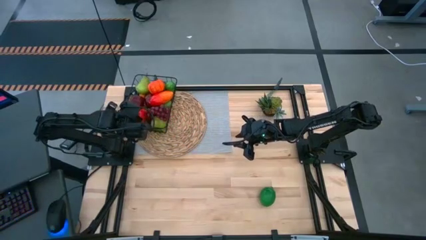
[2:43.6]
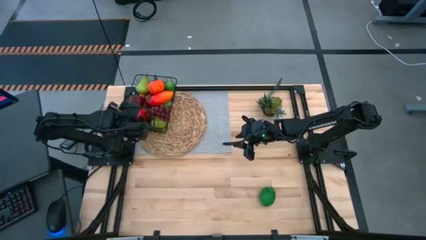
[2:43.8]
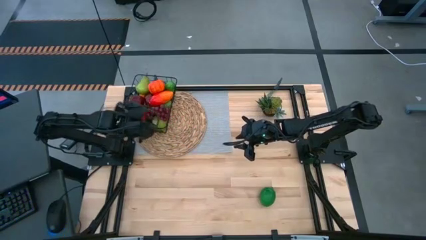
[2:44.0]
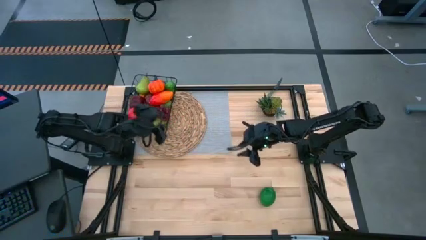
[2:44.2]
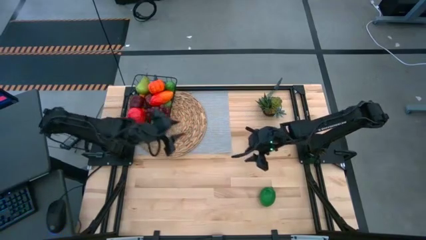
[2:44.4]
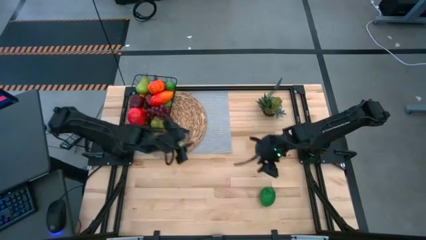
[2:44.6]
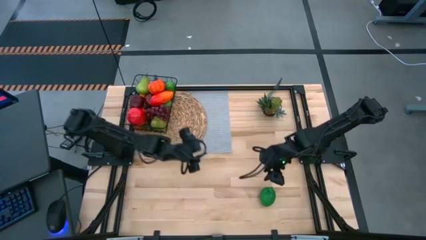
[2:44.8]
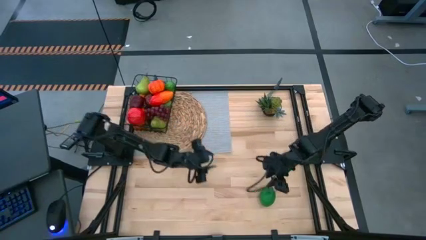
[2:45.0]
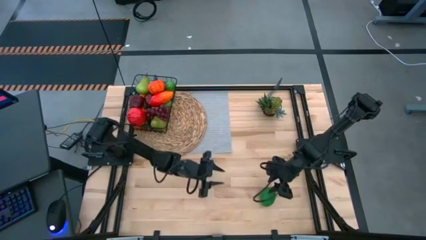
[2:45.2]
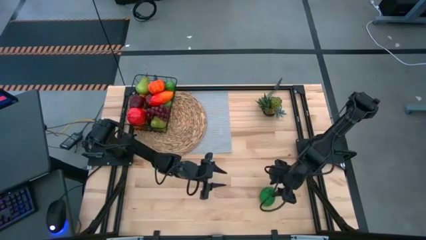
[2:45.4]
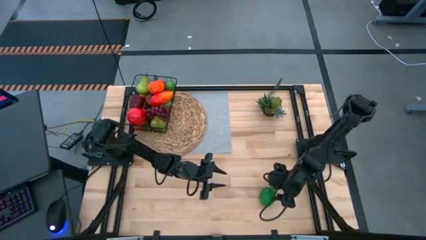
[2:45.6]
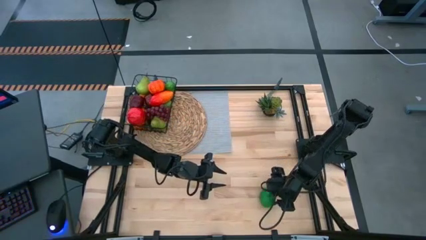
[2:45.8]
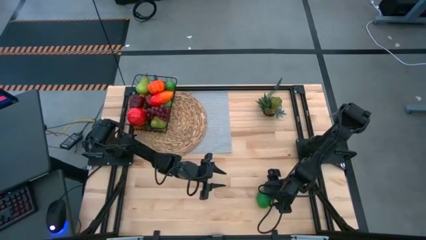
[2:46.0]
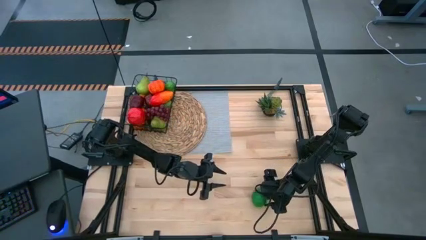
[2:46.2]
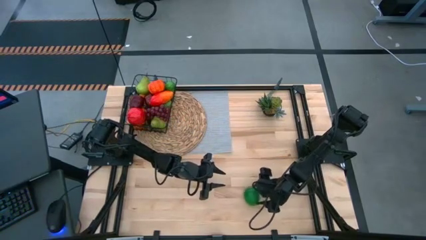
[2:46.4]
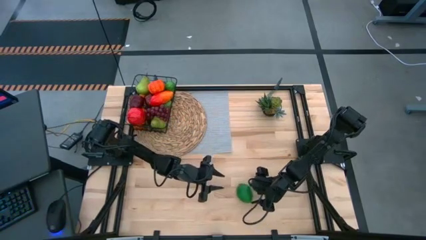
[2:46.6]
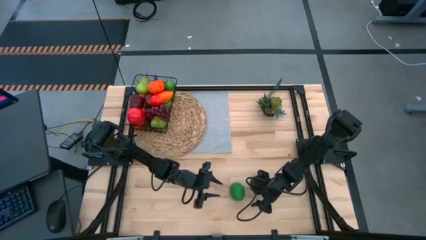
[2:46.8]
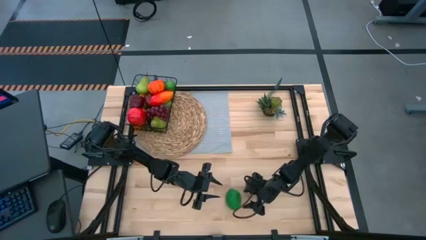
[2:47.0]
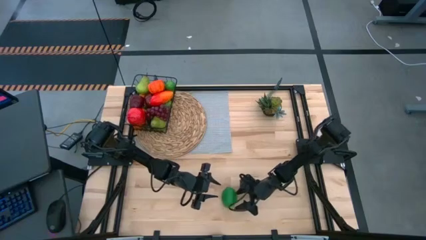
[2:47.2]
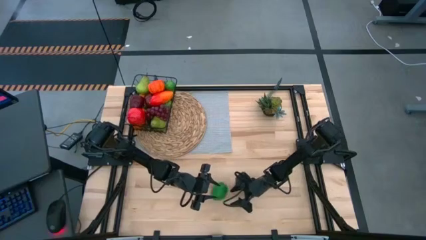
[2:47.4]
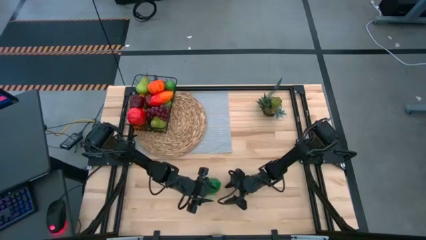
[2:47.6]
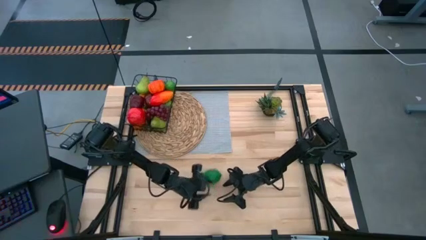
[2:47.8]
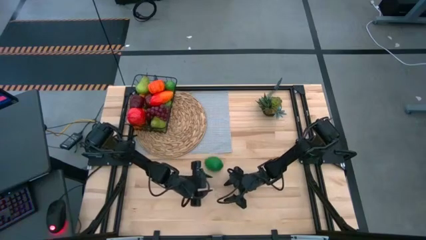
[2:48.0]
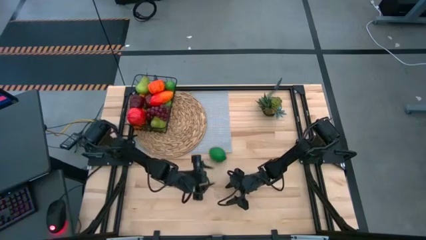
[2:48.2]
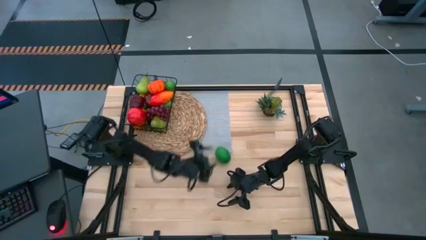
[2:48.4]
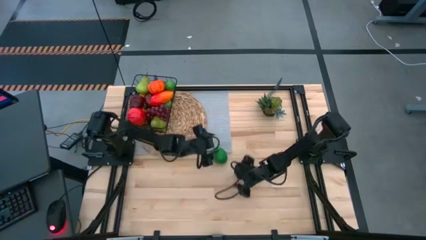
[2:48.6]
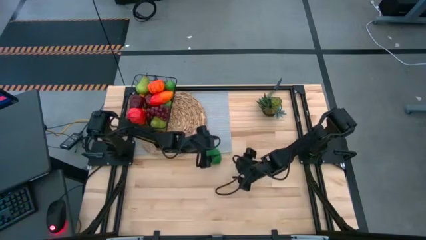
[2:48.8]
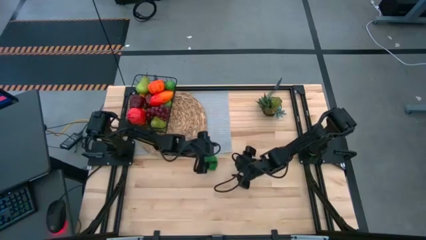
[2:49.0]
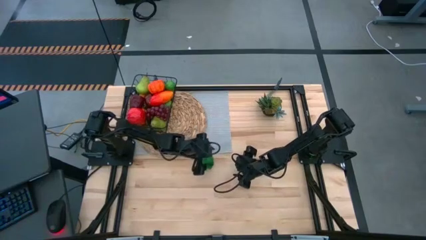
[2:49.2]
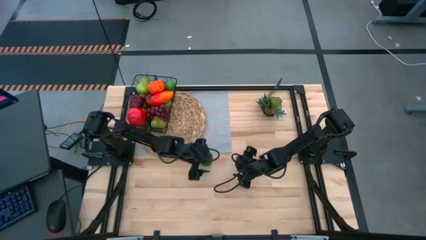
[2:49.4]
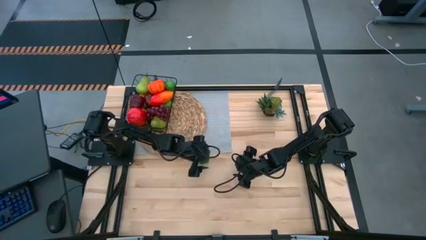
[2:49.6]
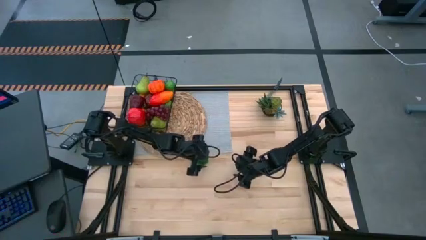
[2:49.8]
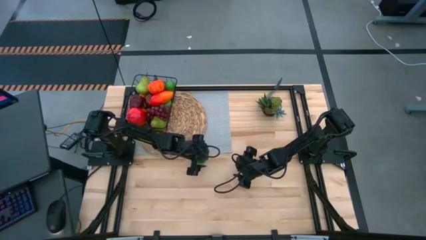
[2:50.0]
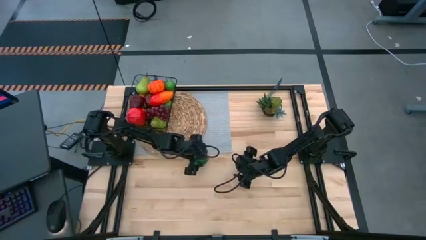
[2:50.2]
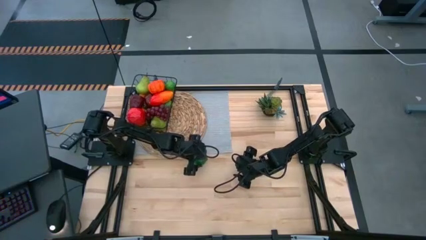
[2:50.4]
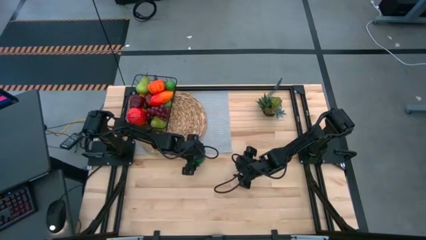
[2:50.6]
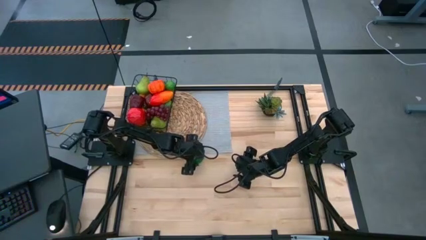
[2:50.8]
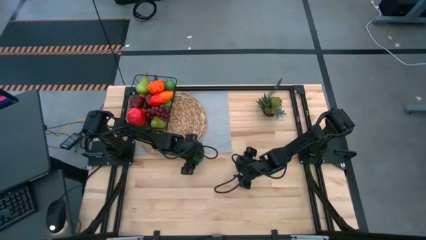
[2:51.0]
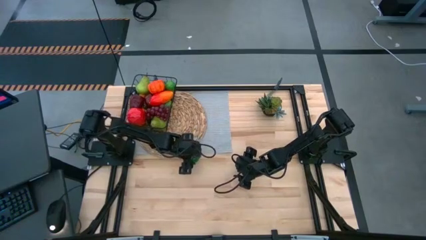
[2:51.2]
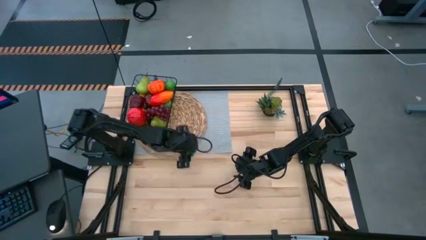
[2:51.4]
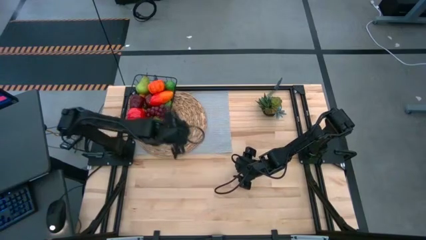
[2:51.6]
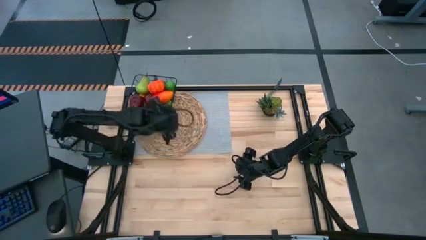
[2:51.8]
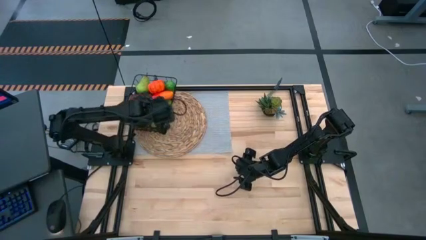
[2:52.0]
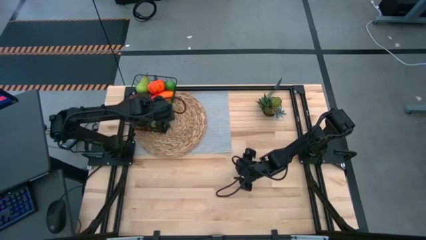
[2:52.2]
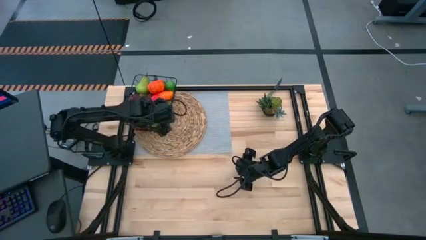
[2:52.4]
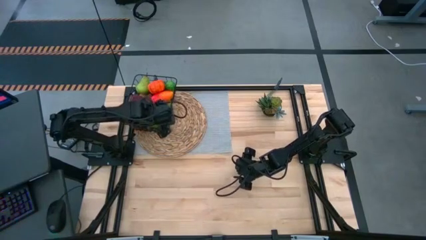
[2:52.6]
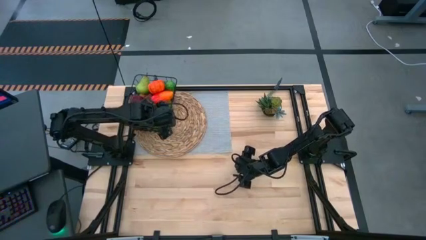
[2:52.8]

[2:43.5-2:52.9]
Task: Build produce basket
Put the green lime into the wire basket

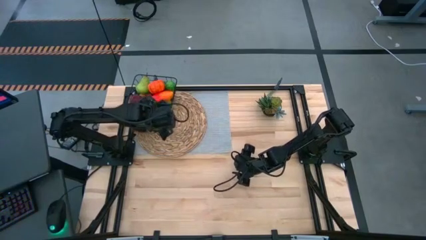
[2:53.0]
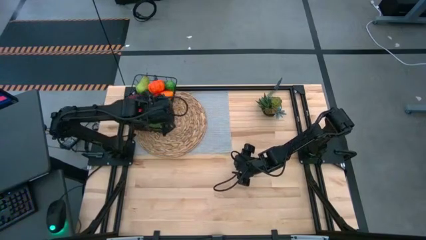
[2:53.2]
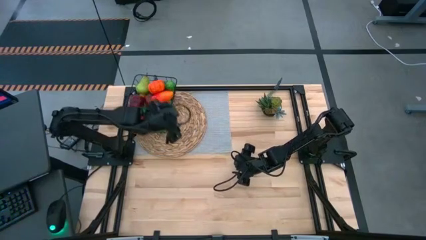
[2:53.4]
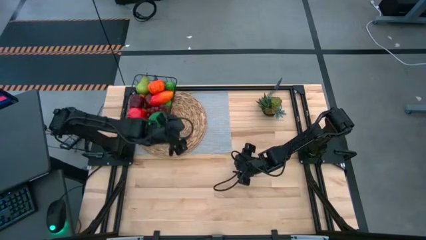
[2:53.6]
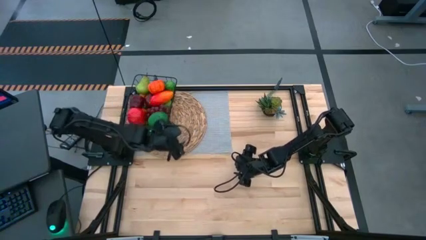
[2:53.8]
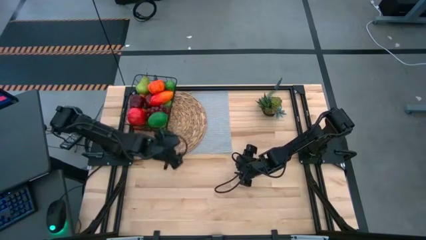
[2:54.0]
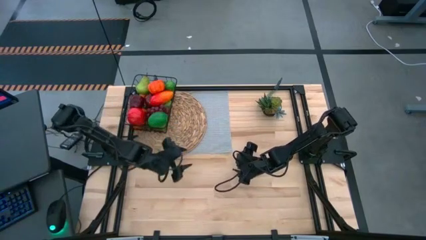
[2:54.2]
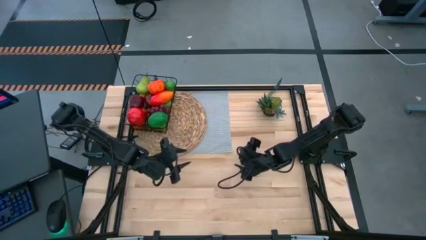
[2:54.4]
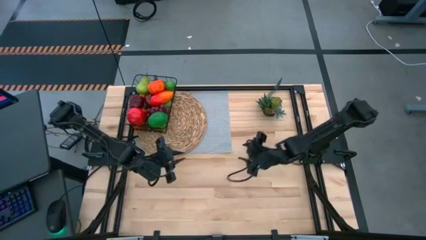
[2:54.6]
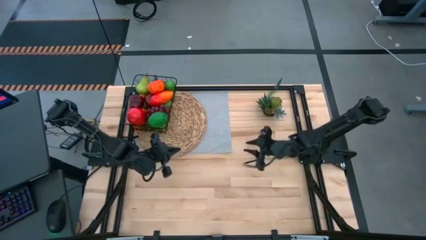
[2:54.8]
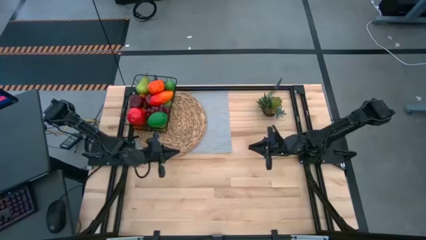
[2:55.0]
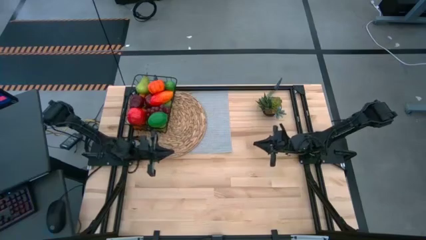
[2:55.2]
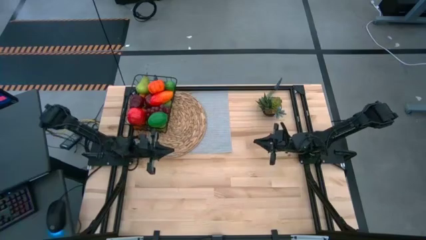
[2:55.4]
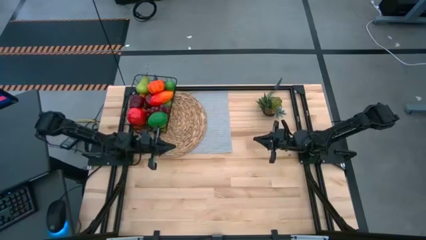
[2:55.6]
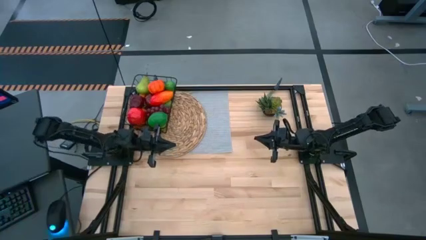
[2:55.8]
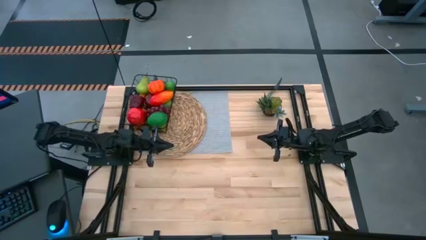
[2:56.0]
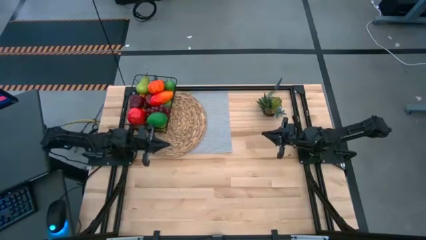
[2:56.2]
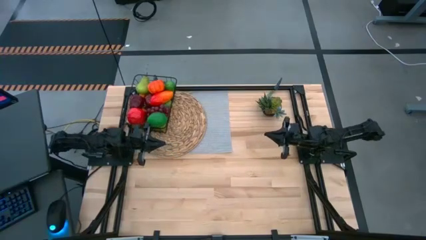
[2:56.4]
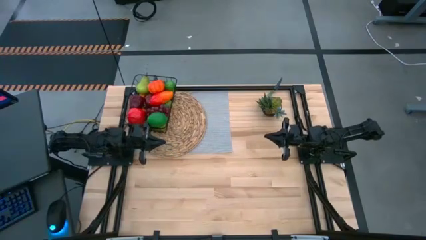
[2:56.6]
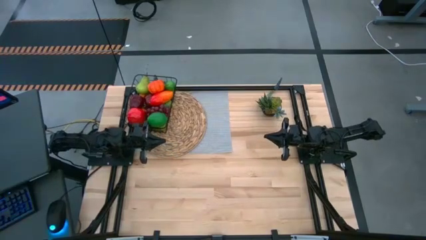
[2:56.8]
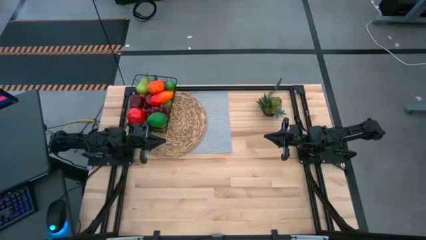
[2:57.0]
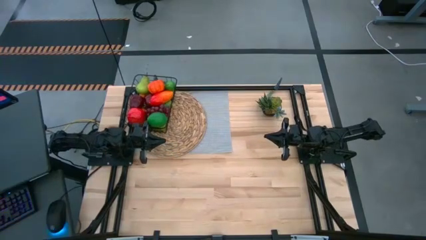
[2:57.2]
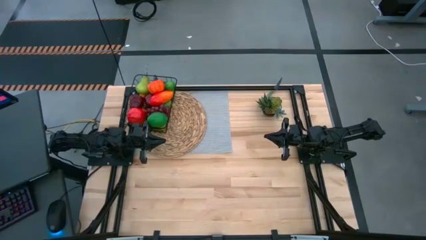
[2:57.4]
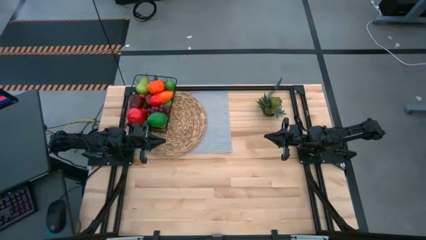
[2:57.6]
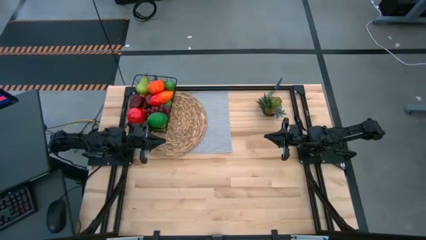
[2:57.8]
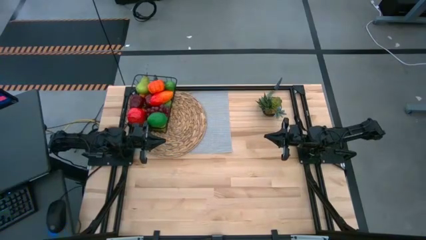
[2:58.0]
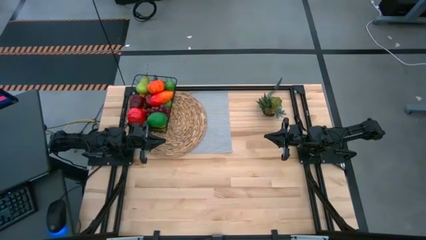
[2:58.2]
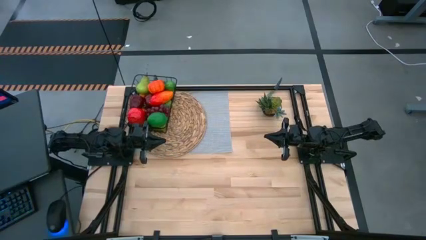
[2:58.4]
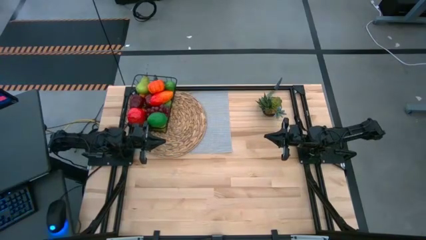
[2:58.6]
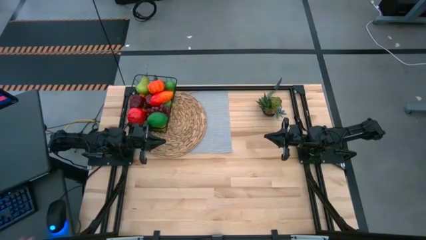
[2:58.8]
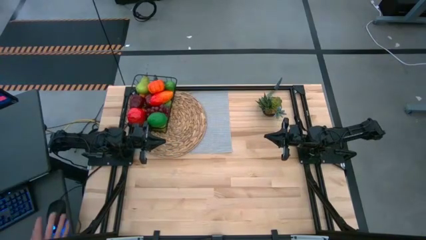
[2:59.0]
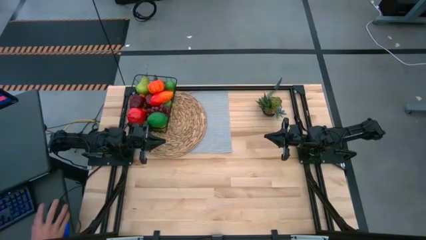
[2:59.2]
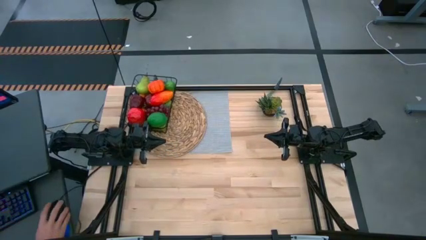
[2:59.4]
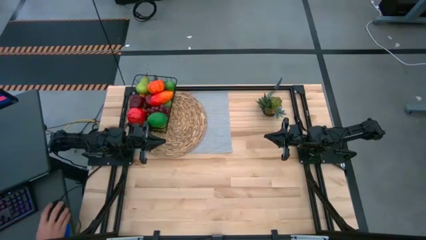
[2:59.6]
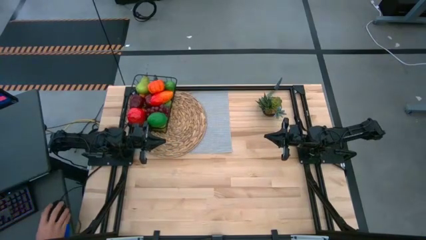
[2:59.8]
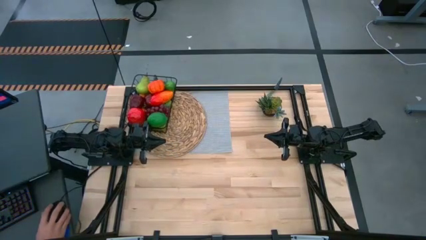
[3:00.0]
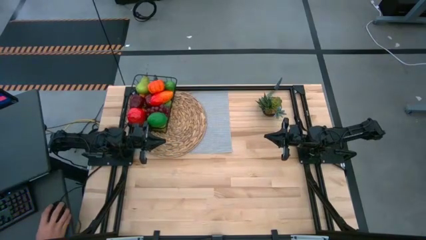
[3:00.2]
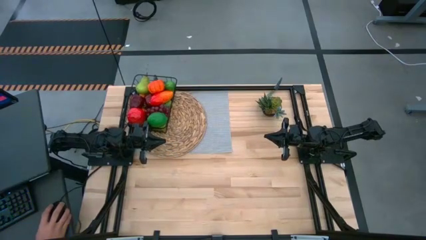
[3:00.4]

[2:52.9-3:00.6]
Return to Home Position
